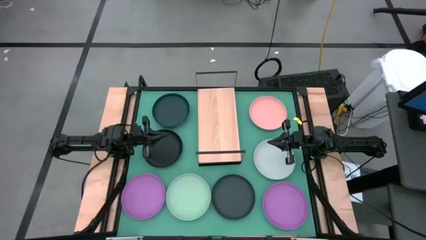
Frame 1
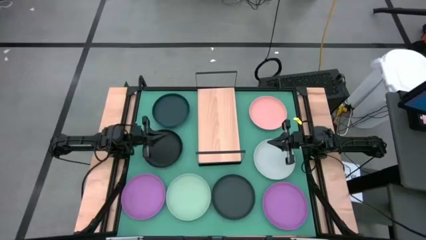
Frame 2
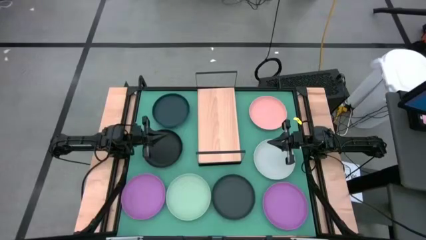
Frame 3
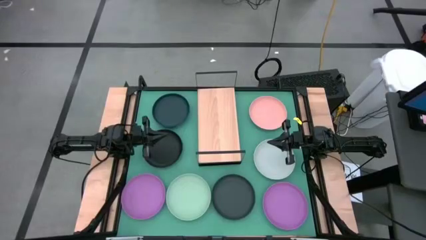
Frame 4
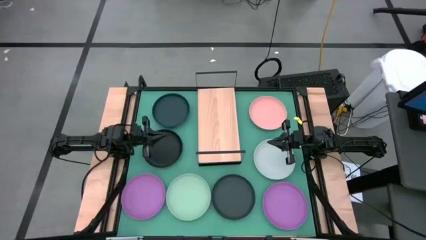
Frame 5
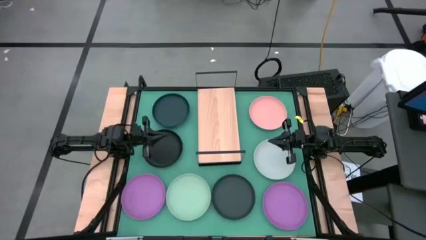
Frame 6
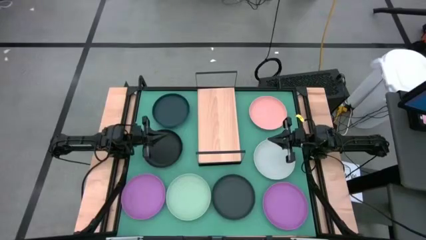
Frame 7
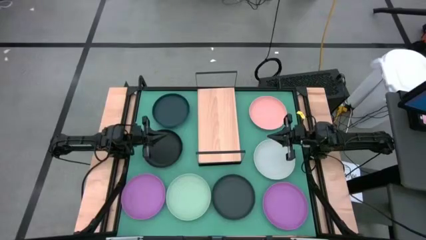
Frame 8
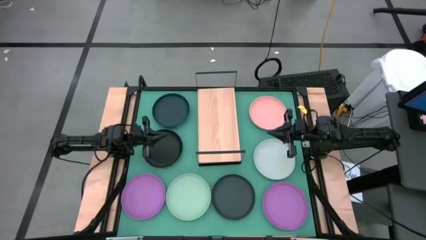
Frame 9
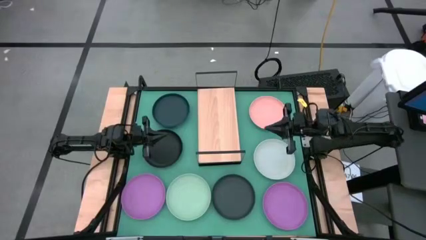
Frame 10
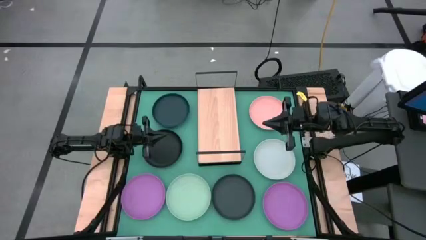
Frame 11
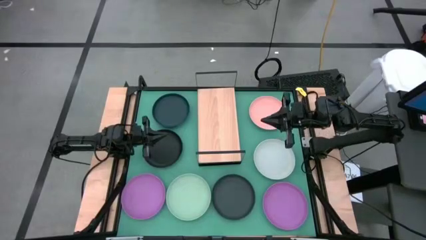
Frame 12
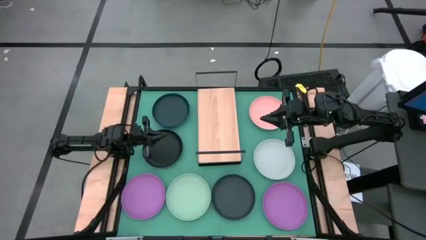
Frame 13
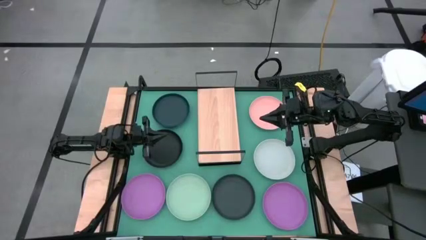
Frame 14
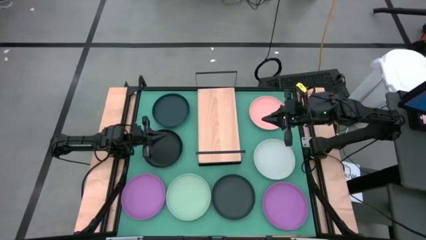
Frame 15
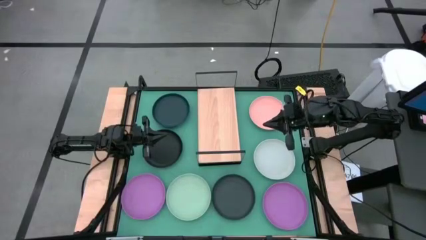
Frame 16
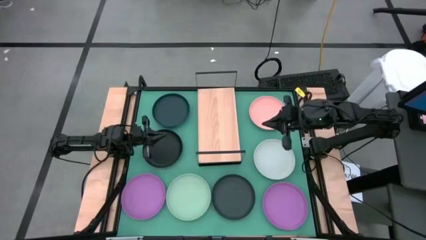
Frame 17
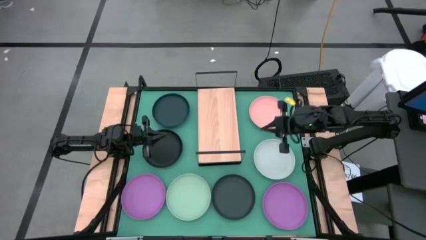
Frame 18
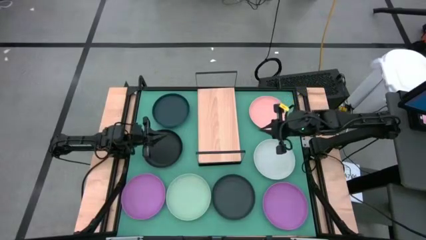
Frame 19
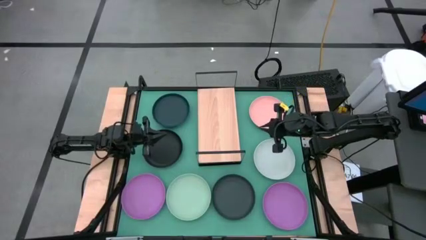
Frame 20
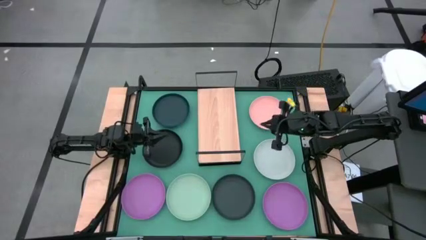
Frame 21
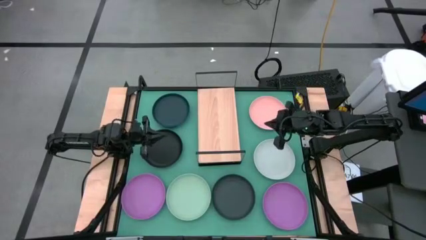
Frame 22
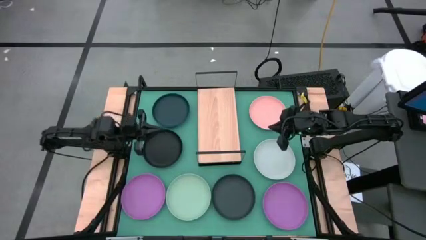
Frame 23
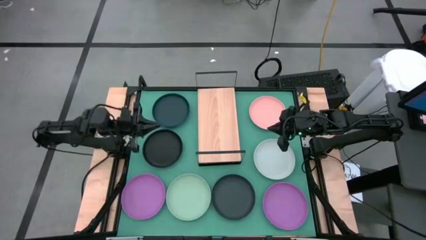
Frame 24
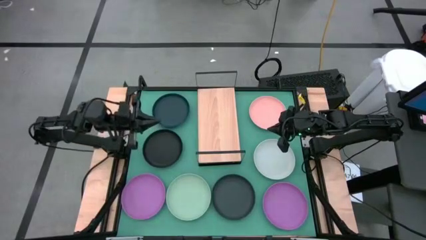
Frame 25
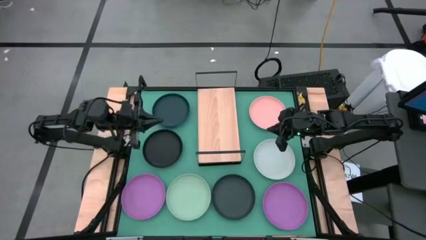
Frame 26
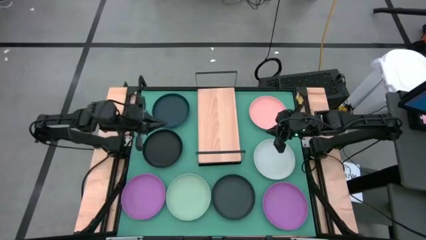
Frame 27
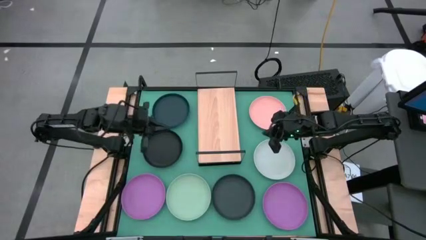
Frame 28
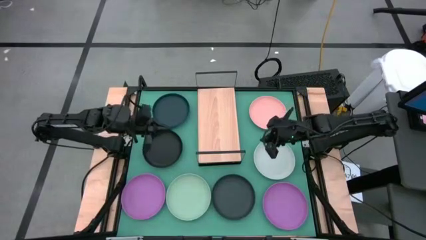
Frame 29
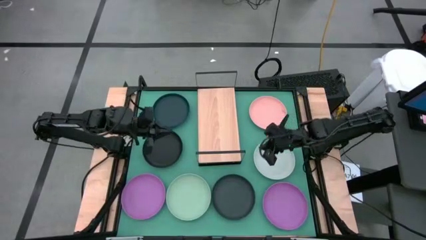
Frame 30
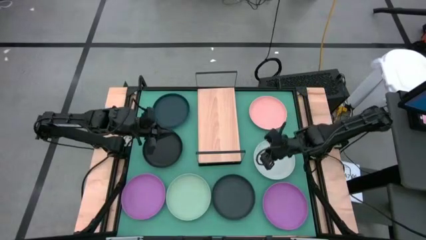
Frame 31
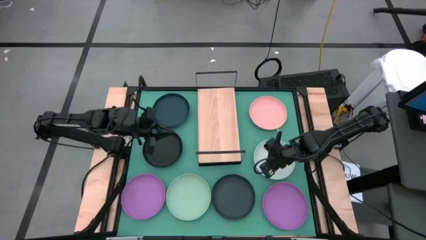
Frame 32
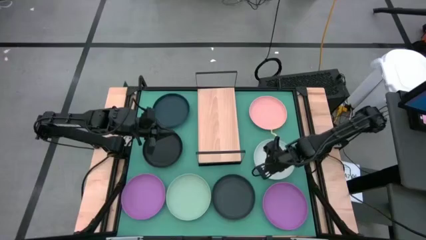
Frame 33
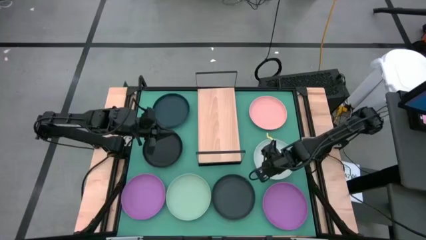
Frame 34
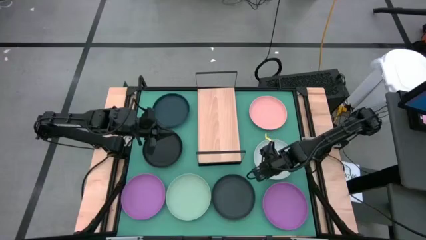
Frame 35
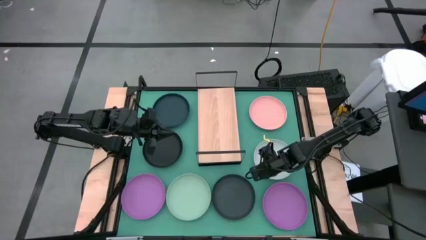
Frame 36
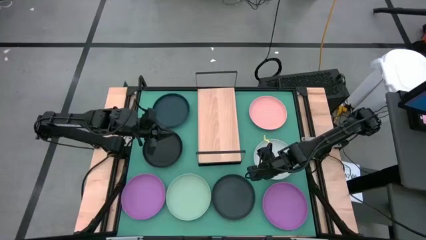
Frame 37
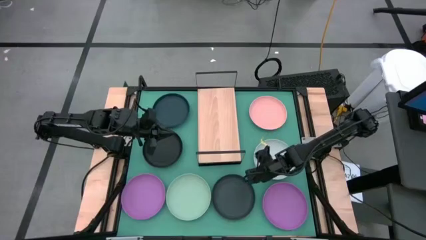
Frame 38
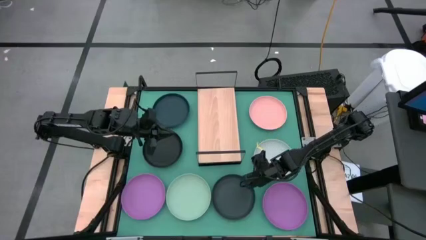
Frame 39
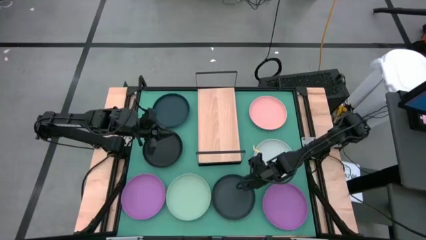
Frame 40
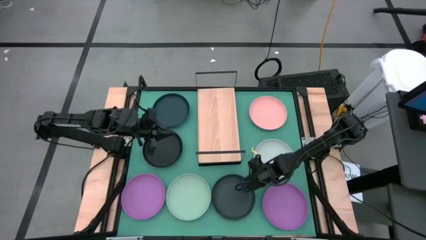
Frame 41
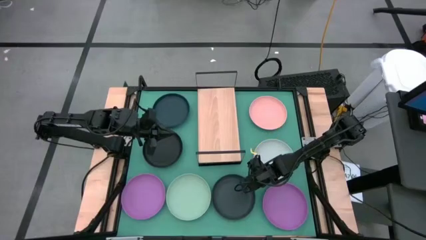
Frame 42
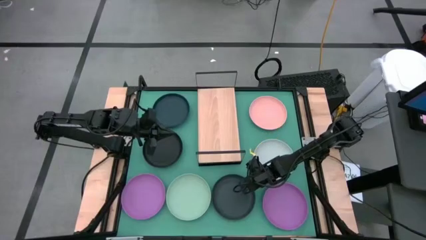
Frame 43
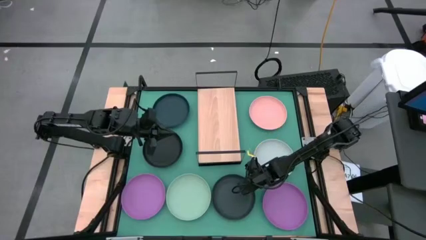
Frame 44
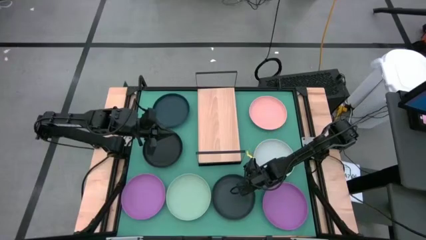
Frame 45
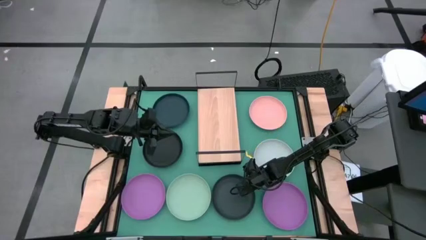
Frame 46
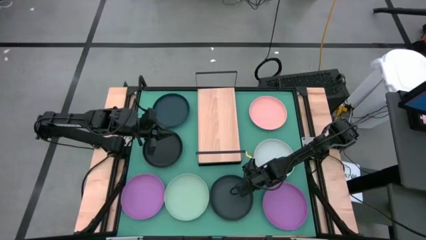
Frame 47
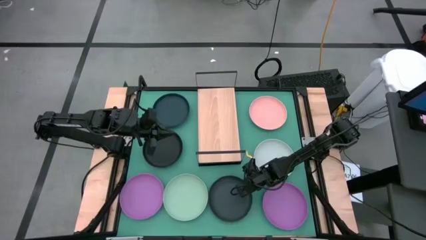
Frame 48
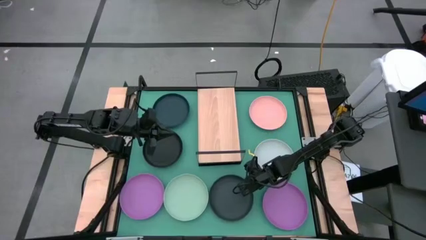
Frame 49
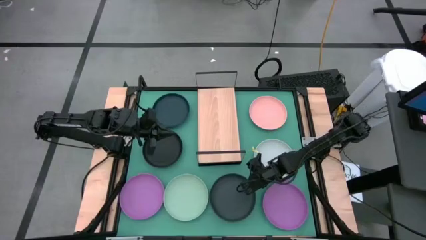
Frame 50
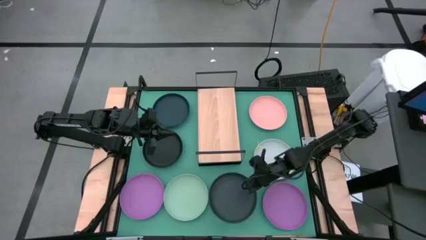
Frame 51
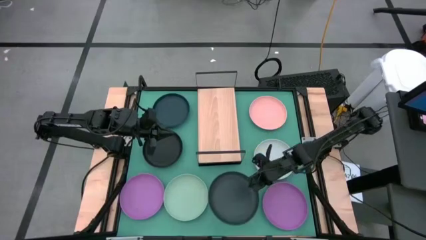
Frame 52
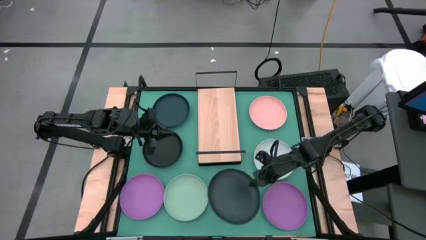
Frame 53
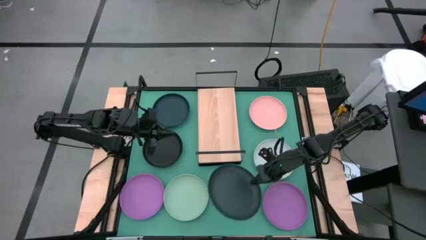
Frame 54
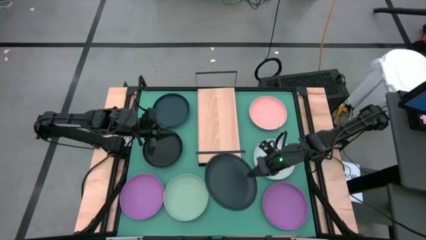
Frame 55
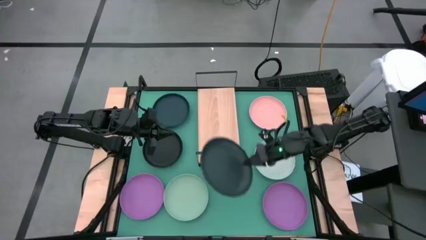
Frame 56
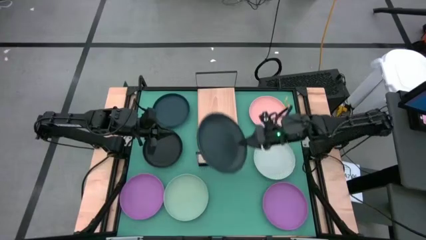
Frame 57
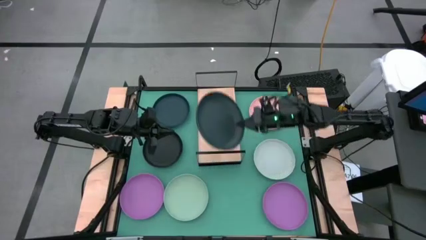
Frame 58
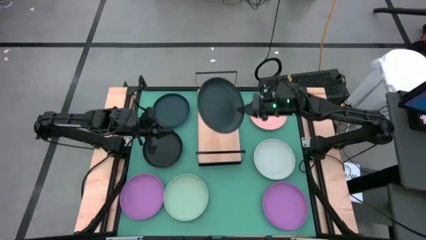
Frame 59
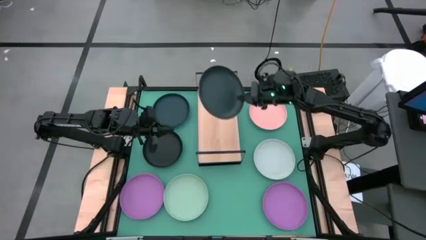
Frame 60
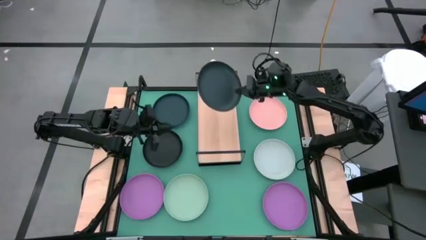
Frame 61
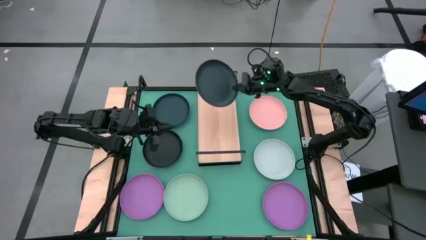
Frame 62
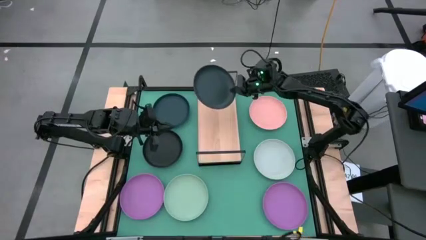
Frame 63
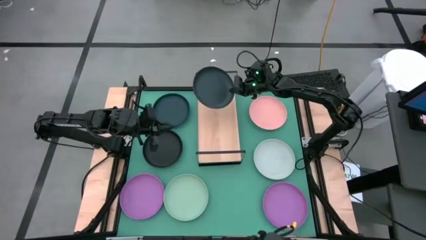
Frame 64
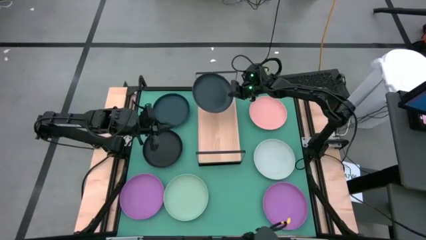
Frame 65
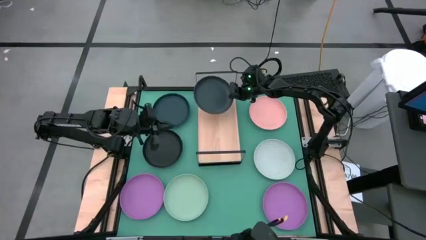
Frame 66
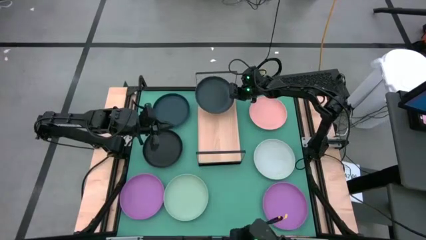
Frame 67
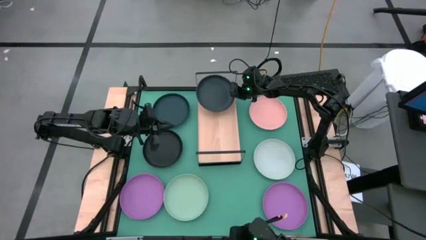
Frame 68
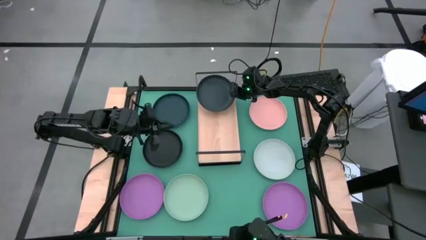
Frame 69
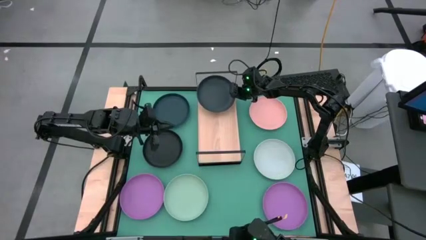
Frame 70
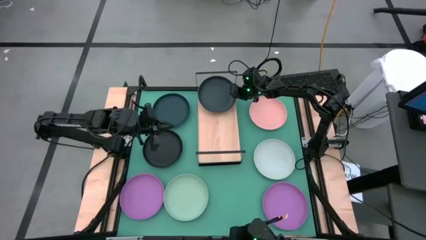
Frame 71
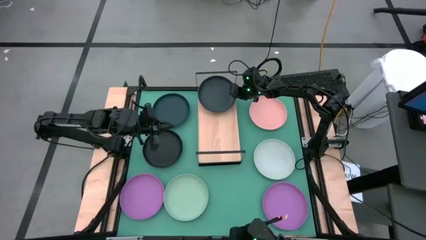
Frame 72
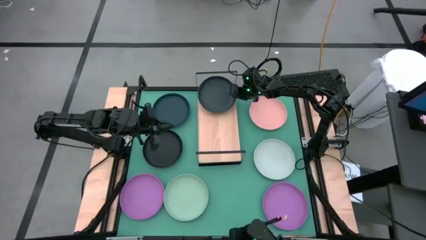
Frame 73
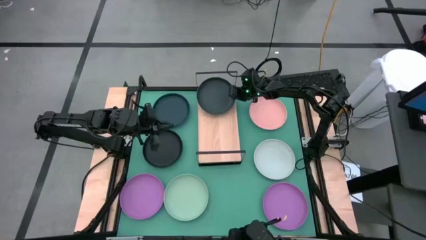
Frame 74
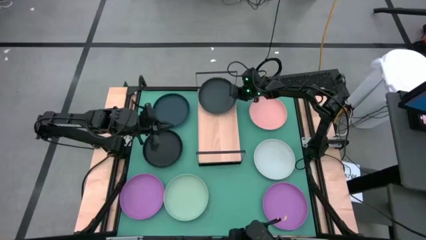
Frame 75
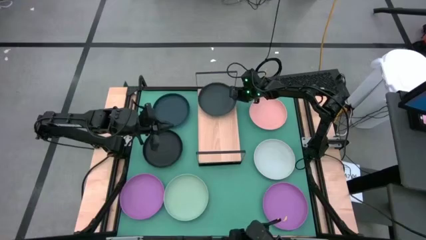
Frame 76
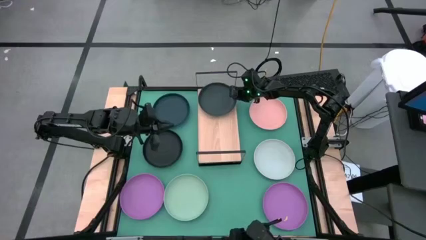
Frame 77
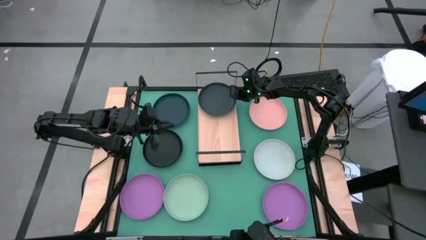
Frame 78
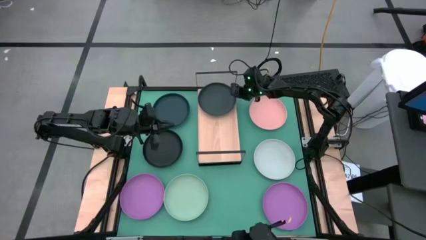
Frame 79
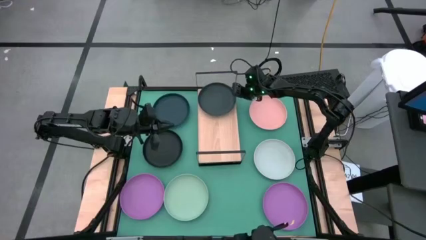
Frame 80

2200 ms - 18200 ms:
Task: Place and stack plates onto a shelf
Put the bottom black plate on the shelf
